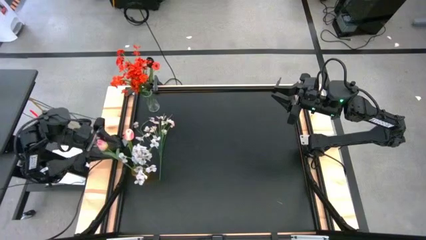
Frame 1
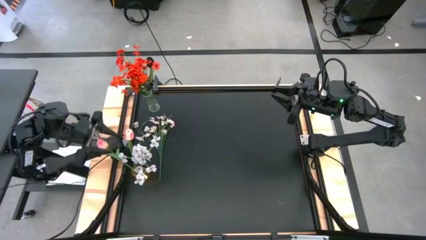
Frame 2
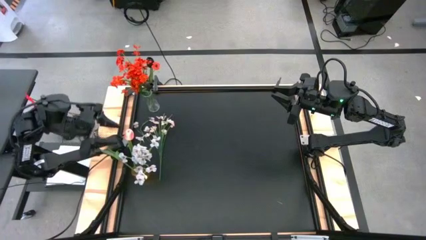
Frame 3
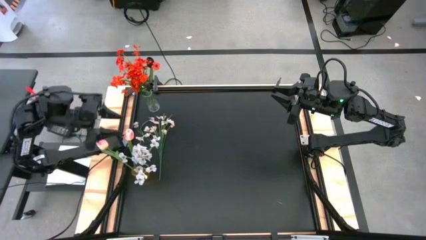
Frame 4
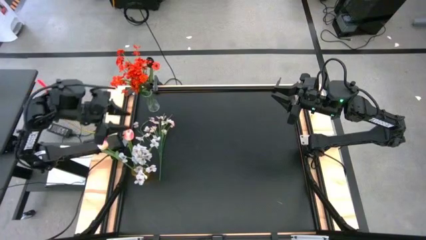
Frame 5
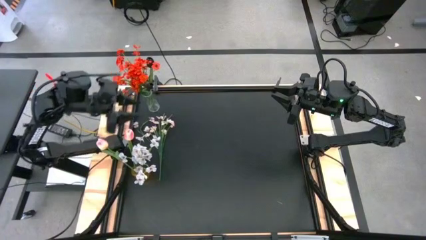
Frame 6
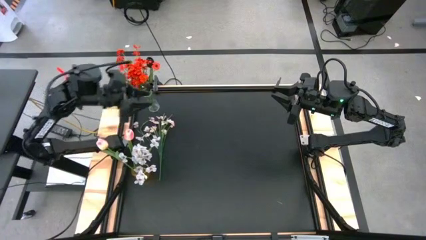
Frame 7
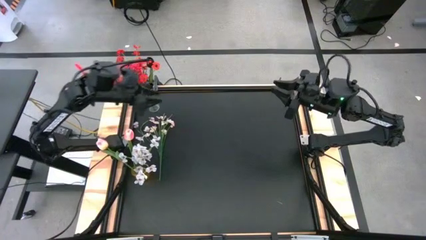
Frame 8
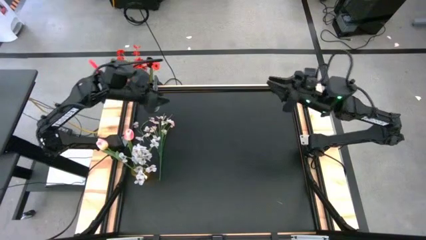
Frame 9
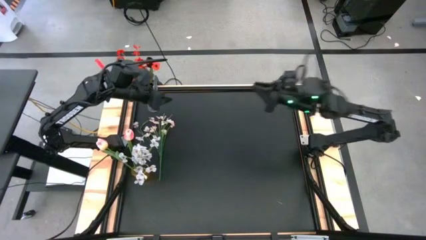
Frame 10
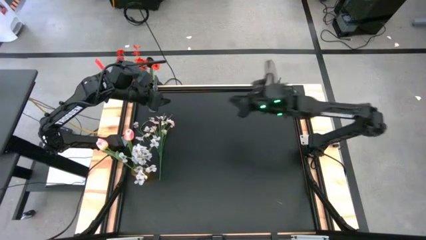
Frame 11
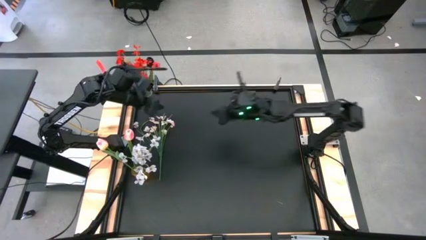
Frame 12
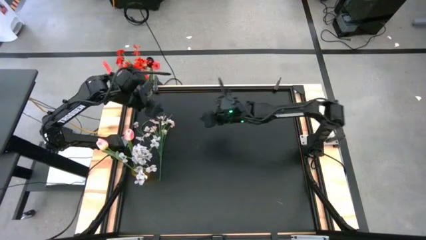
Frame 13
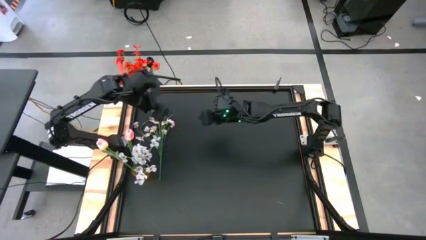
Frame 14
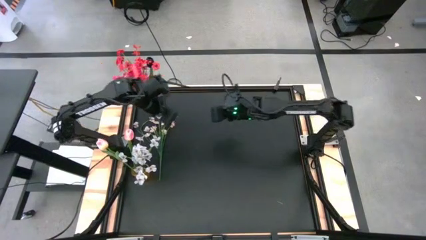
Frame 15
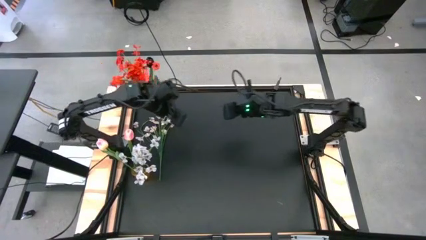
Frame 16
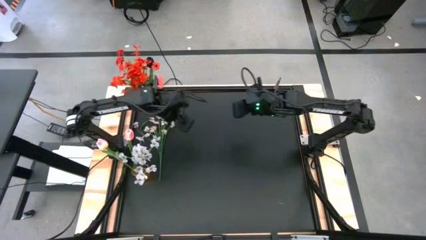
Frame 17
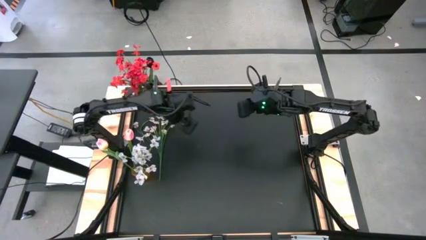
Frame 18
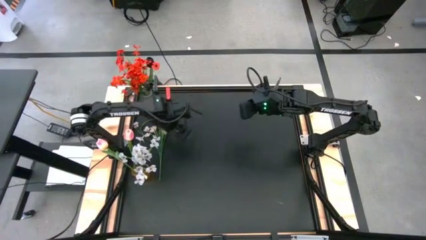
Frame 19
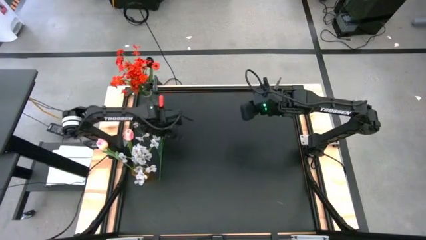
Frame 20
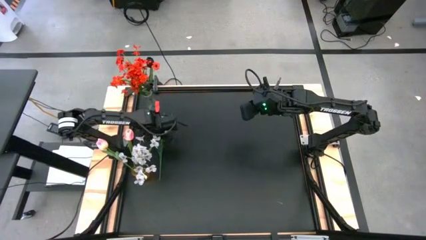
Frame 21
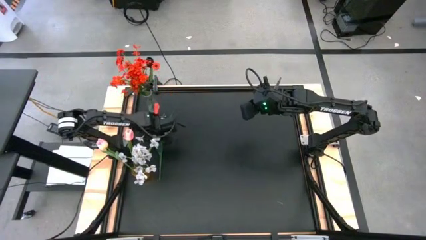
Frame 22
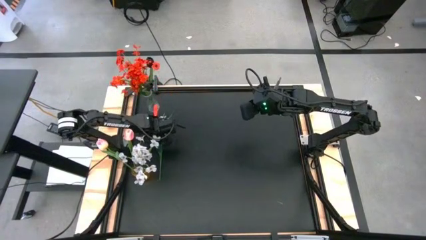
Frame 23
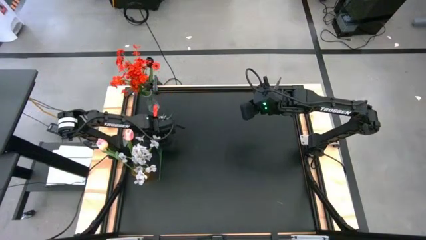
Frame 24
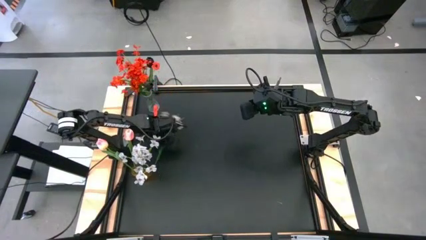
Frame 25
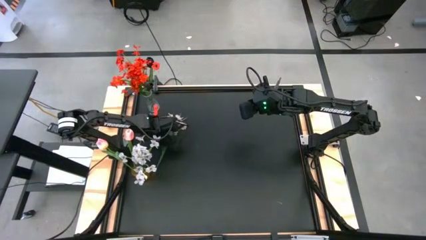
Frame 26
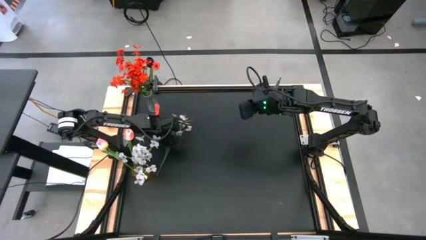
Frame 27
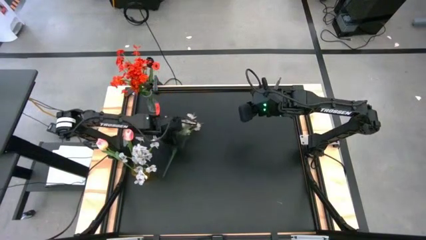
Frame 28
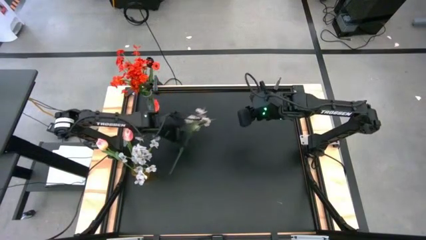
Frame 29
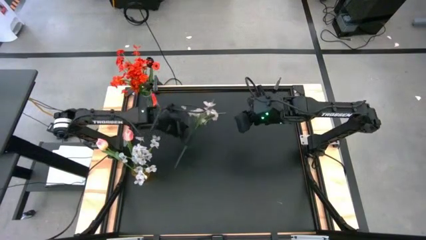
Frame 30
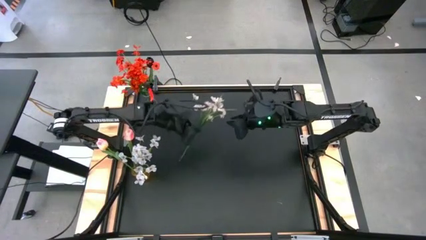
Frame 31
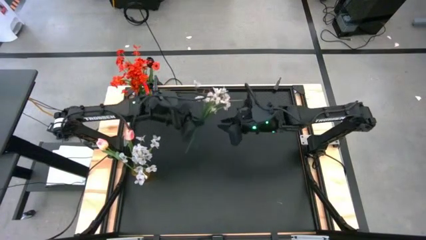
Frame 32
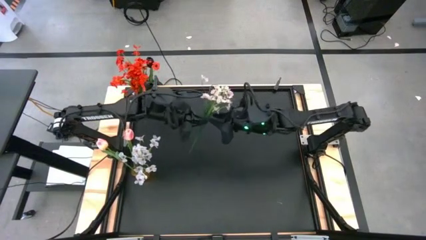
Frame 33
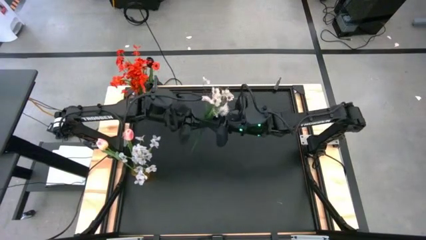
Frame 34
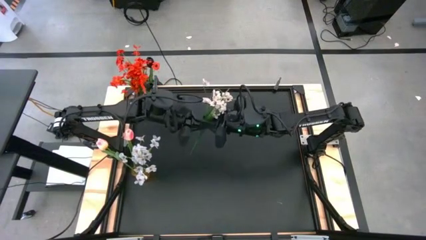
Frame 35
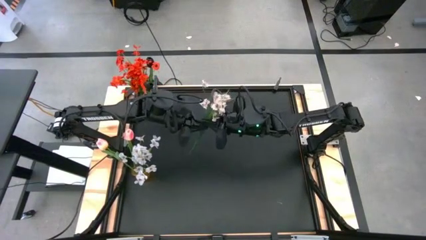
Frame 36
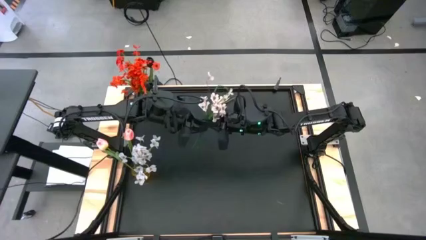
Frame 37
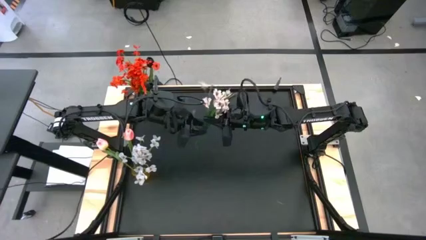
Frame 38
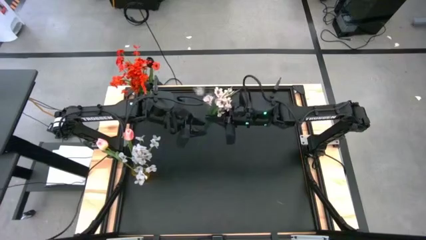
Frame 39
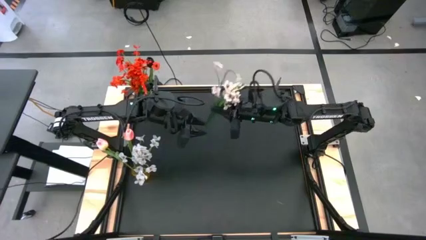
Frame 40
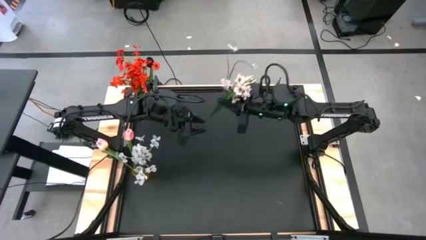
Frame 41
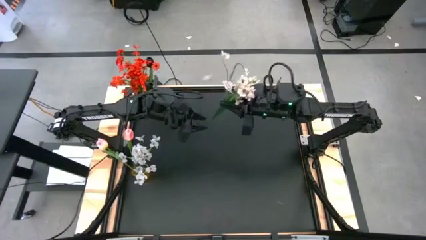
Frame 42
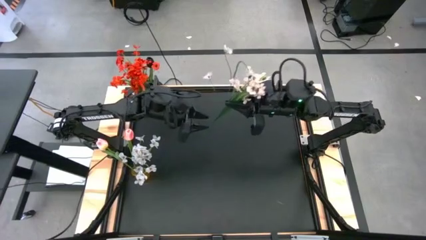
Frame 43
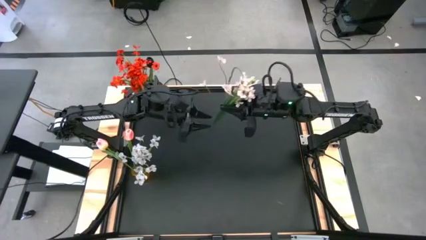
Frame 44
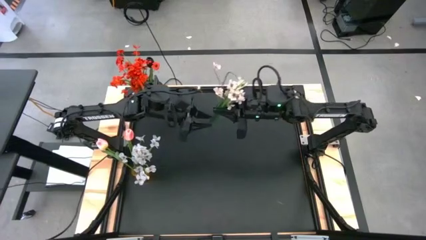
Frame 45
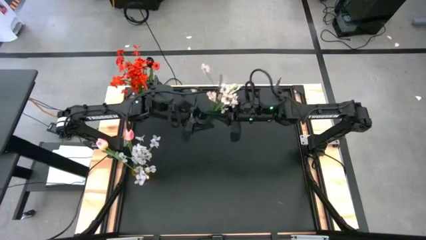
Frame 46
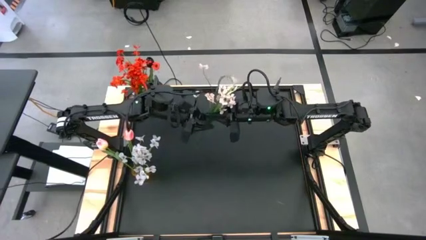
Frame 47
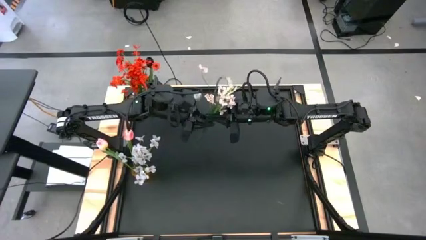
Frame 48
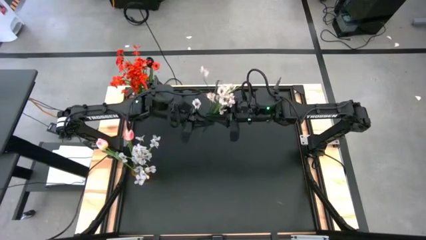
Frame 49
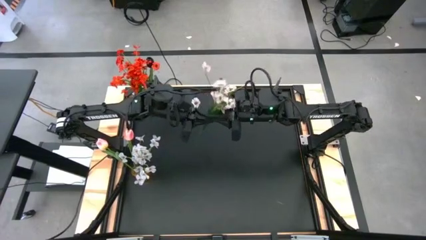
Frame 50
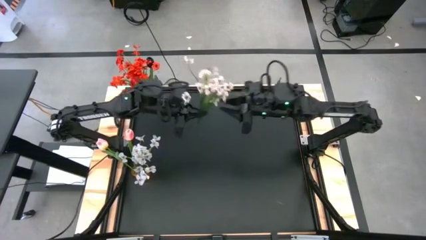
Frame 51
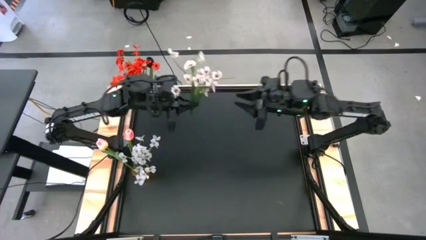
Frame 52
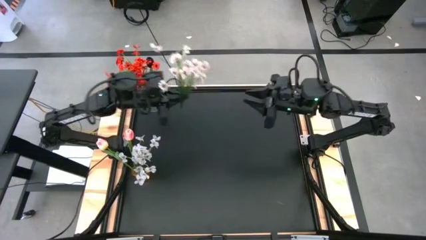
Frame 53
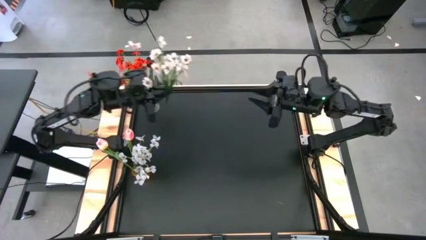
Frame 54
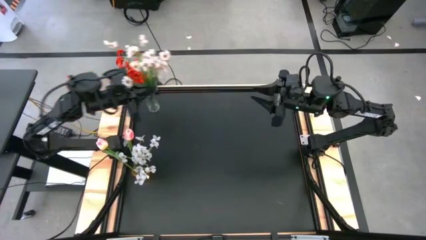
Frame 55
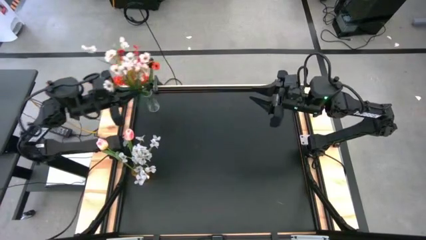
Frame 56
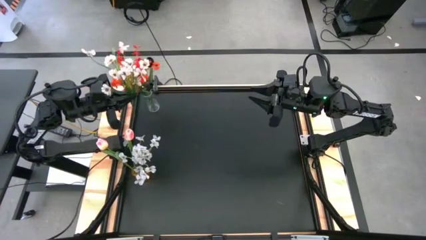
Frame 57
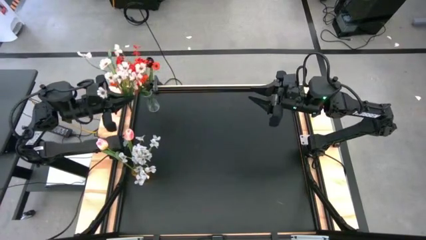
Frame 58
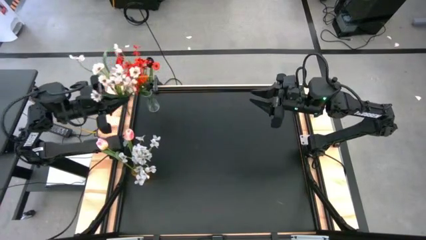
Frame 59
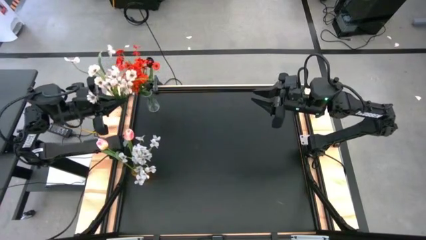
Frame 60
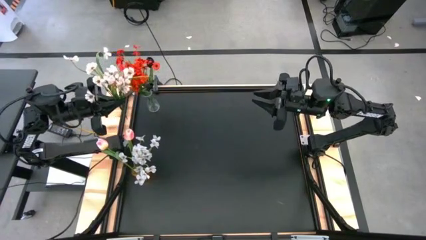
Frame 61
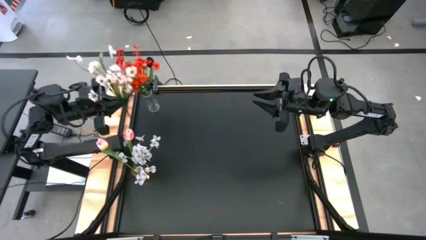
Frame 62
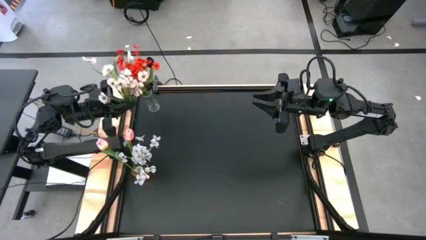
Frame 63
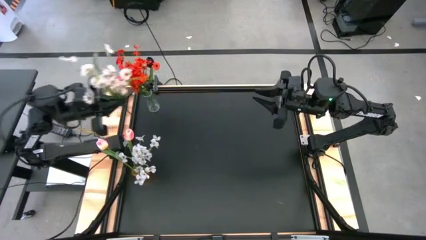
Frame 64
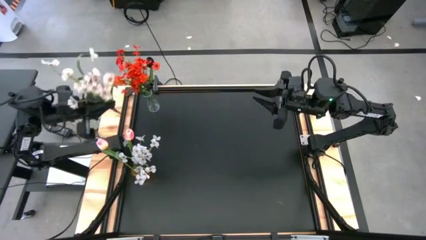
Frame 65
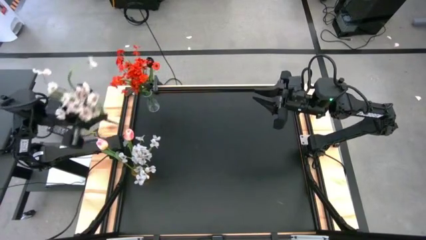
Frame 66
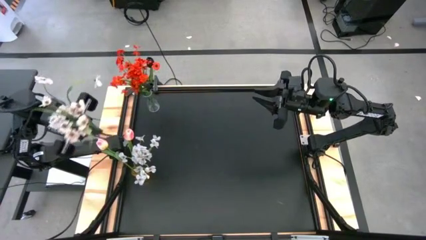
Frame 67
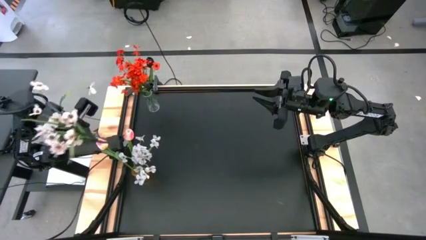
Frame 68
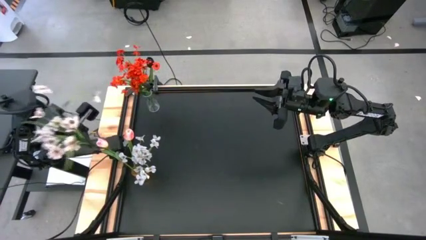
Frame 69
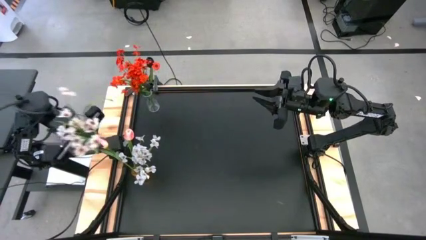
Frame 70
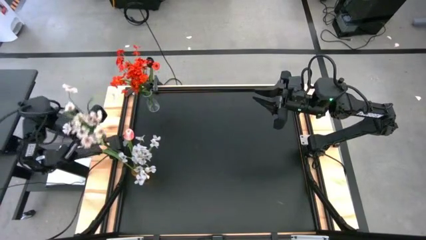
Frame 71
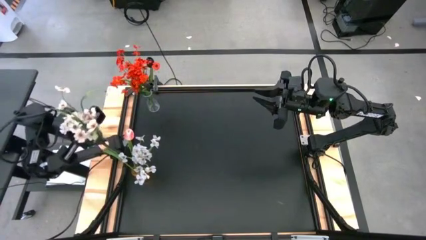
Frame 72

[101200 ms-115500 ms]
Task: Sort flowers into vase by color
Put the white flowers into the yellow vase

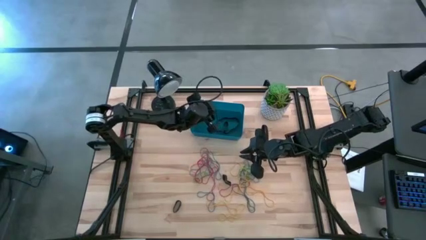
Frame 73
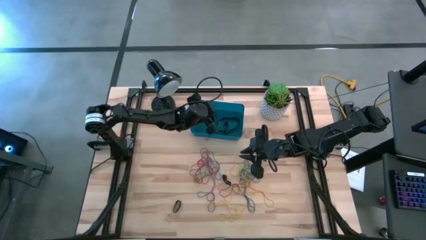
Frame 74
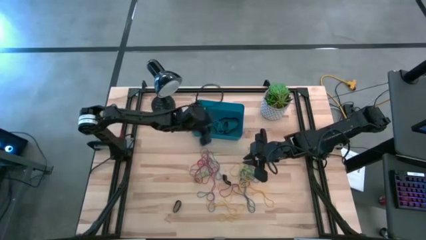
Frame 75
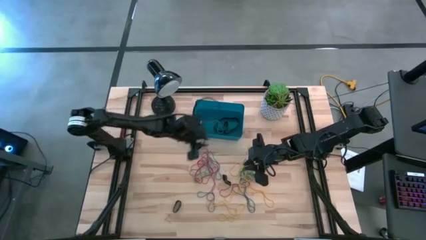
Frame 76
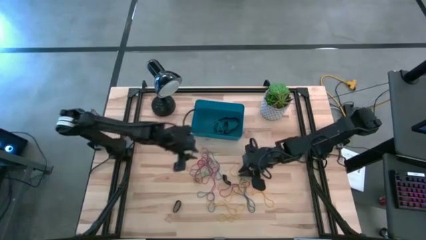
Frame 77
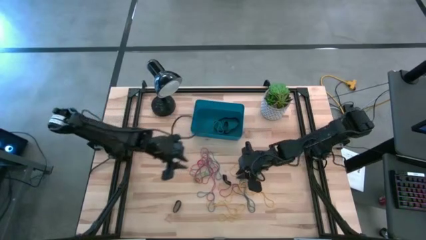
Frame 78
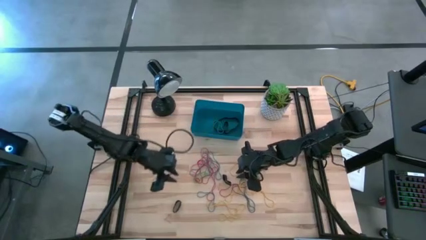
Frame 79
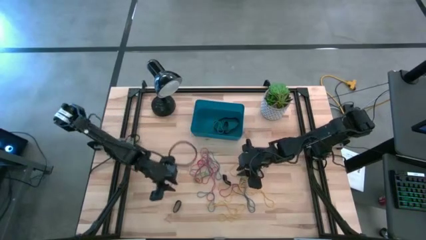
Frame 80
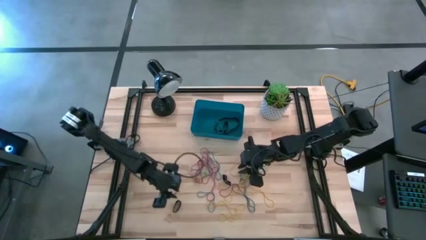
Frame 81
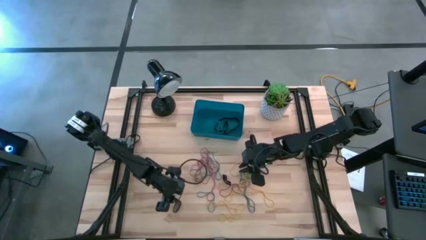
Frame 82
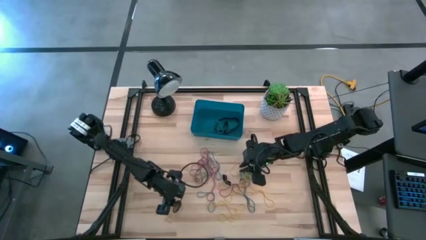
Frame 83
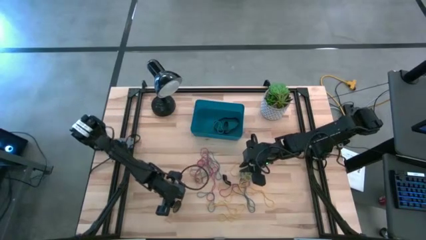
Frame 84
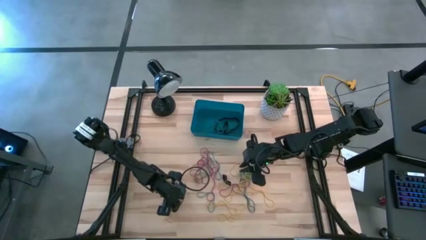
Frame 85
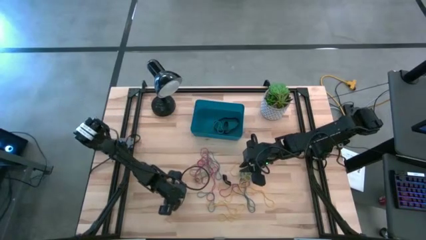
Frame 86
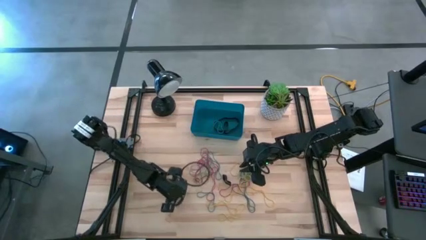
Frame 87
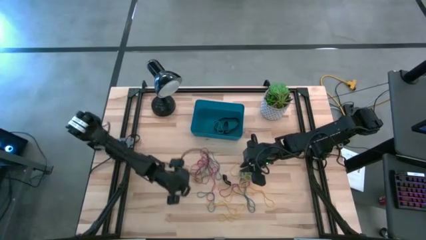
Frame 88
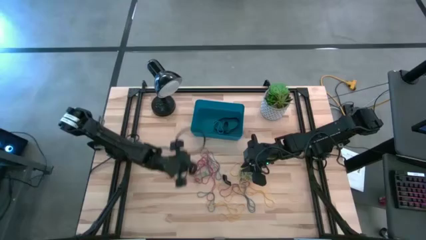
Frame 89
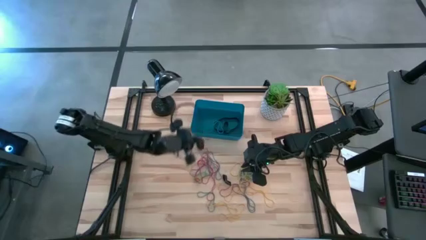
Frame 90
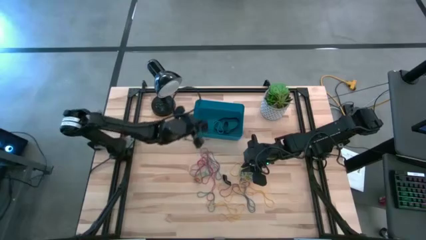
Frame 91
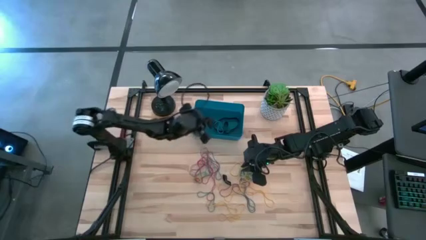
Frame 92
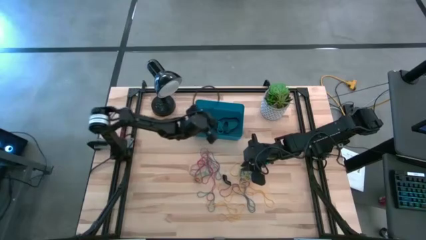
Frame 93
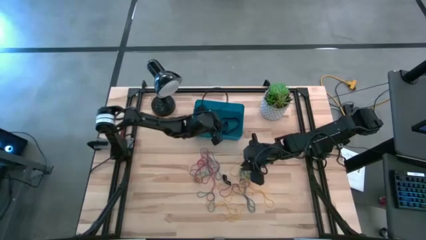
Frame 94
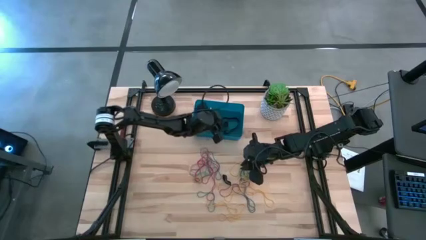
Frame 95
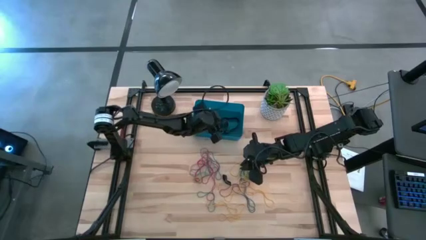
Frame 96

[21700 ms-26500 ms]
Task: Pick and place rubber bands into bin
Put the bottom black rubber band into the blue bin
